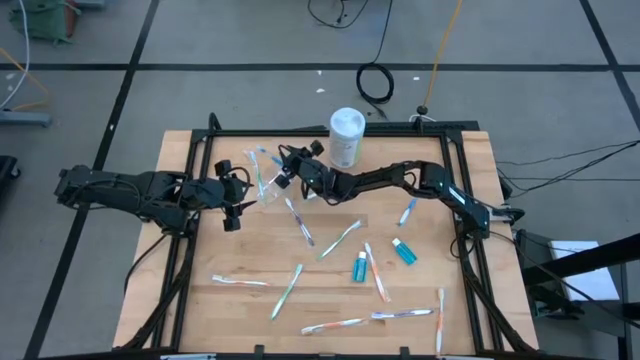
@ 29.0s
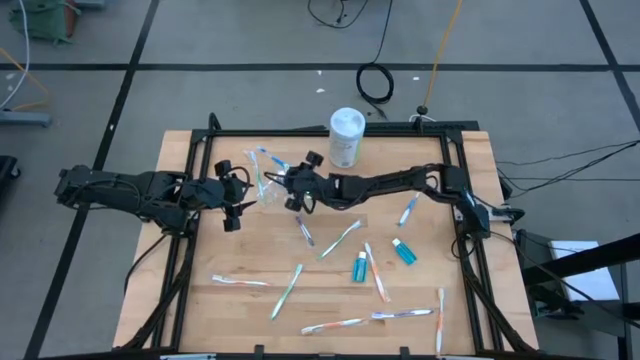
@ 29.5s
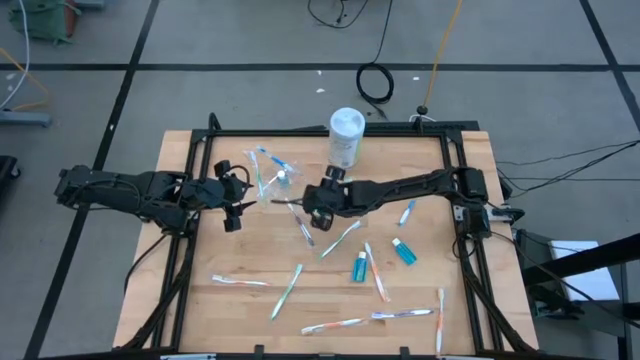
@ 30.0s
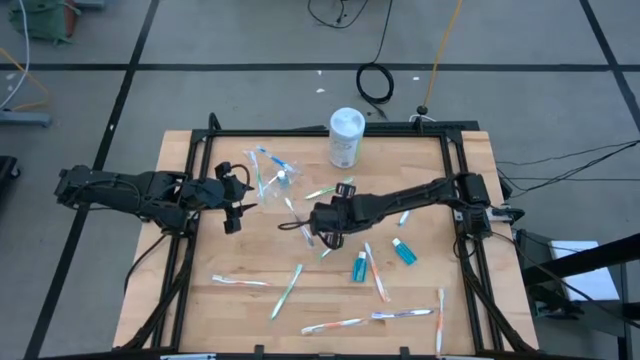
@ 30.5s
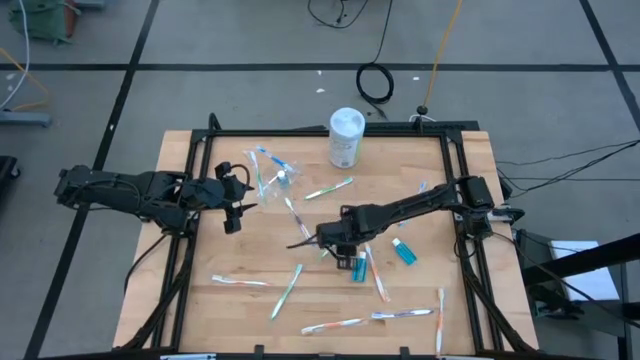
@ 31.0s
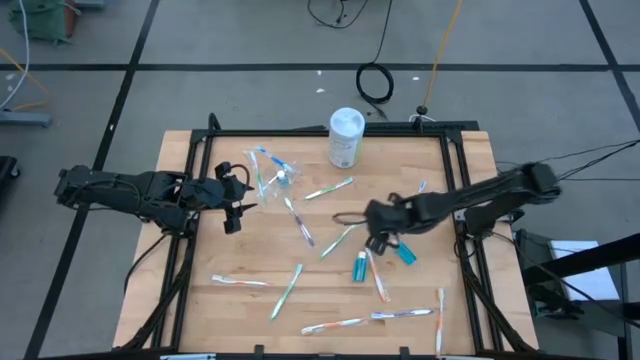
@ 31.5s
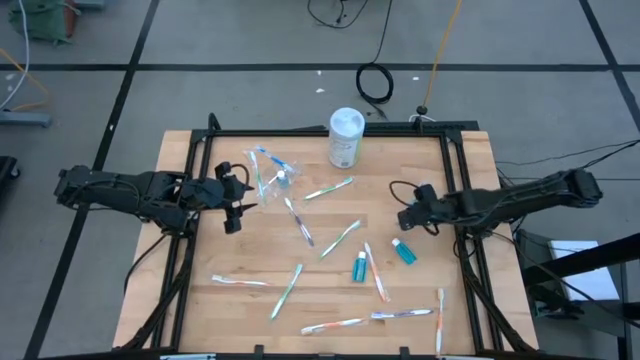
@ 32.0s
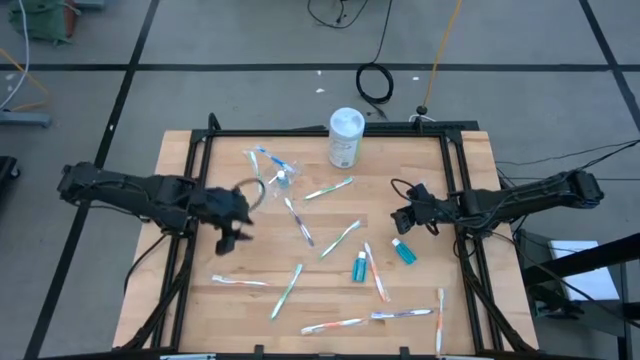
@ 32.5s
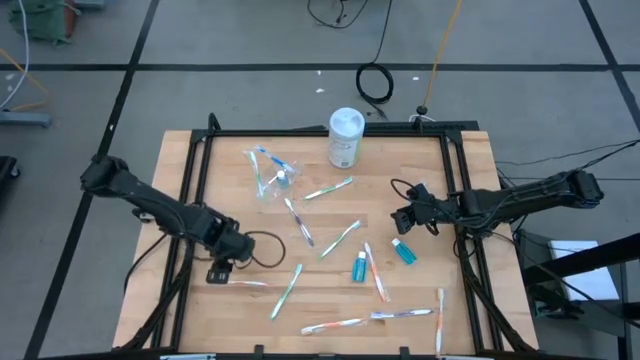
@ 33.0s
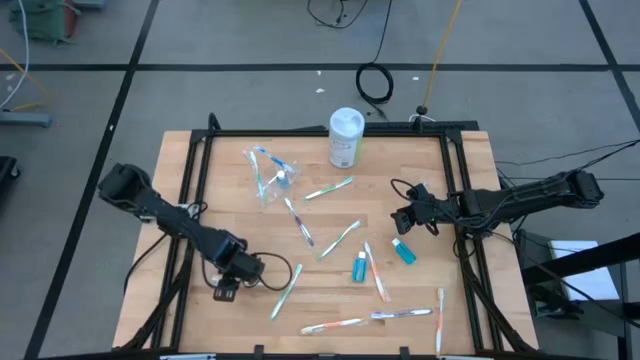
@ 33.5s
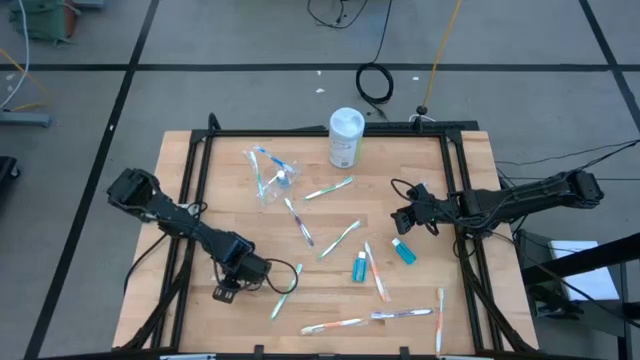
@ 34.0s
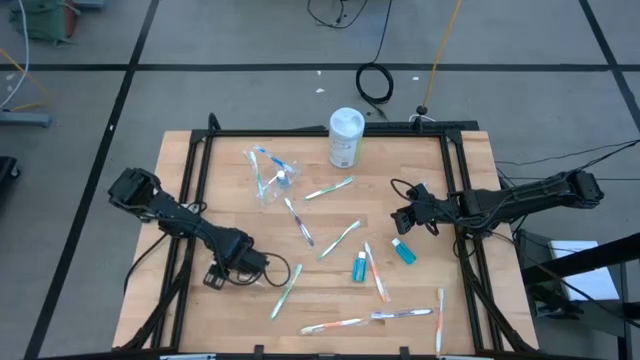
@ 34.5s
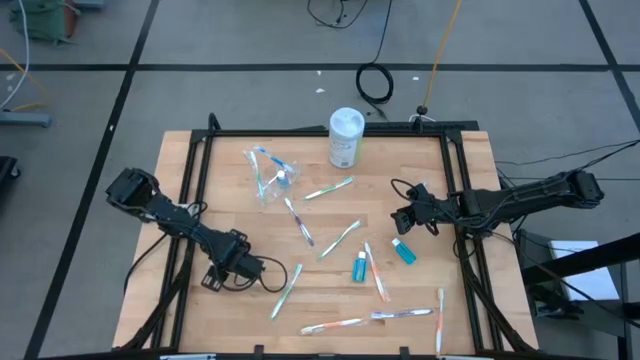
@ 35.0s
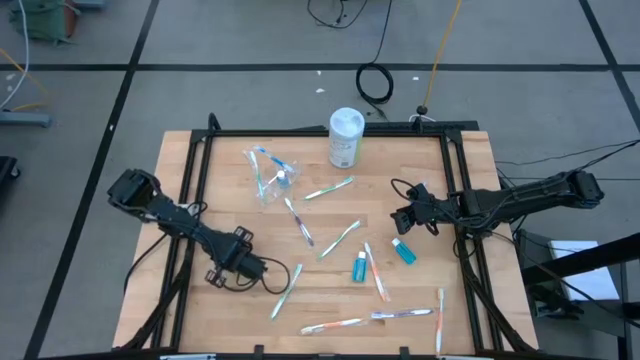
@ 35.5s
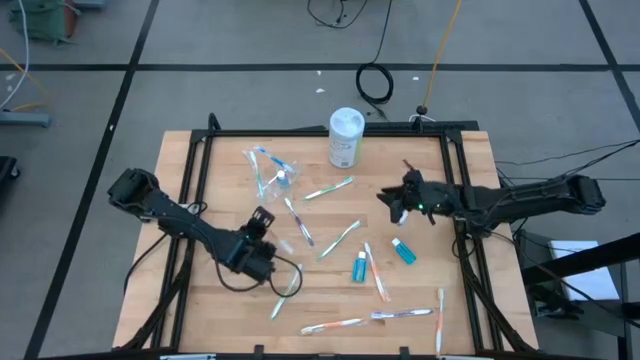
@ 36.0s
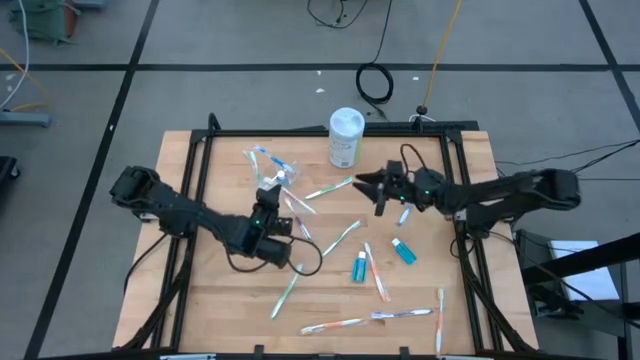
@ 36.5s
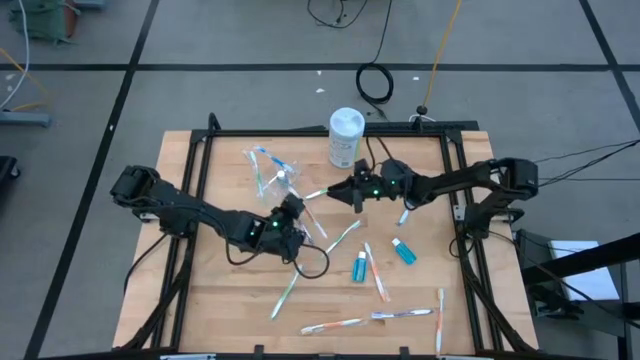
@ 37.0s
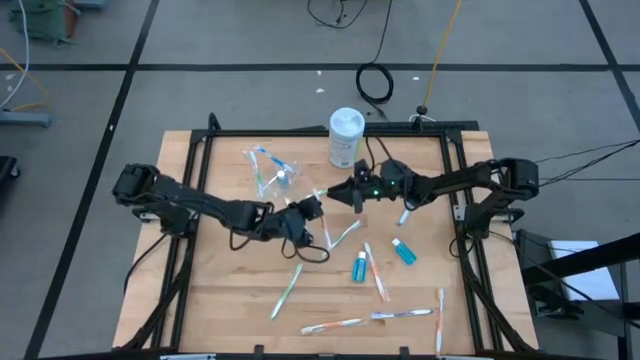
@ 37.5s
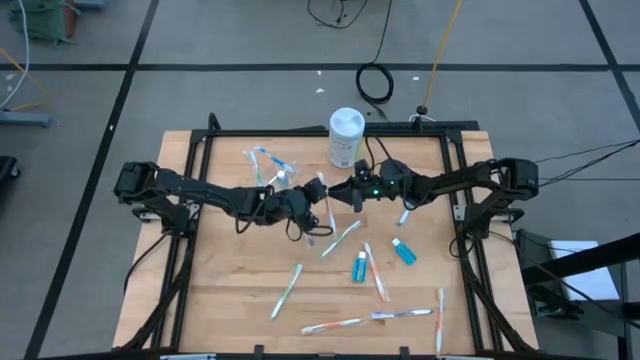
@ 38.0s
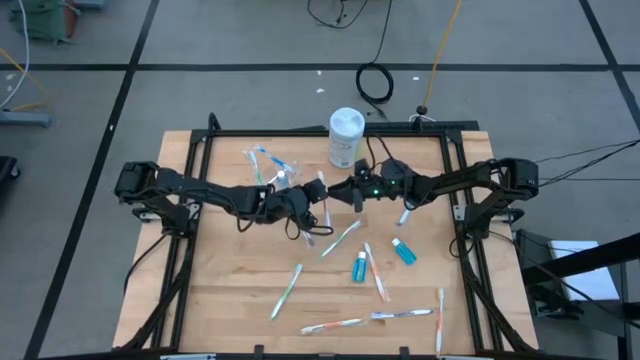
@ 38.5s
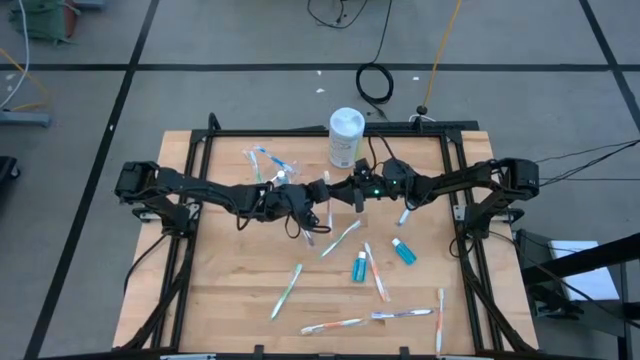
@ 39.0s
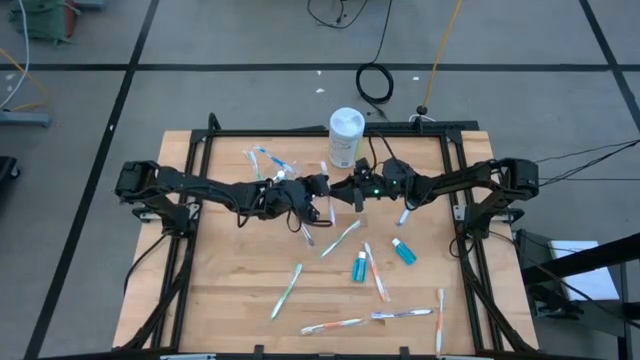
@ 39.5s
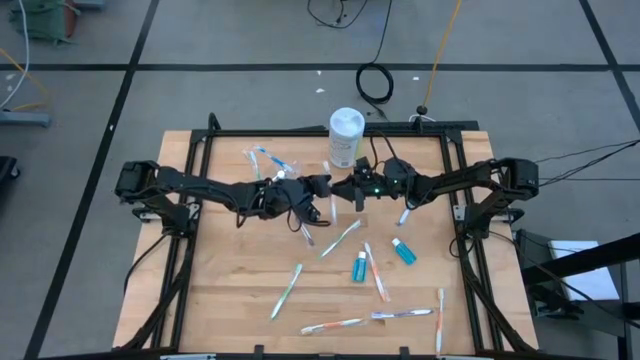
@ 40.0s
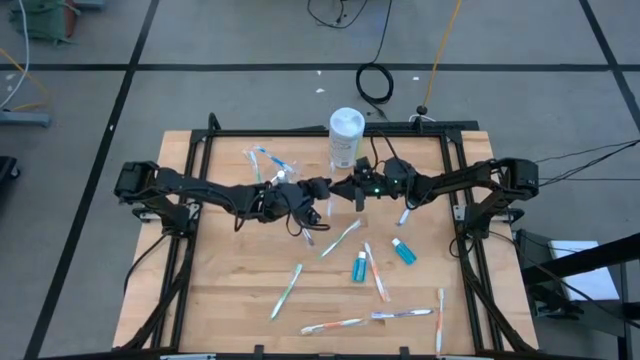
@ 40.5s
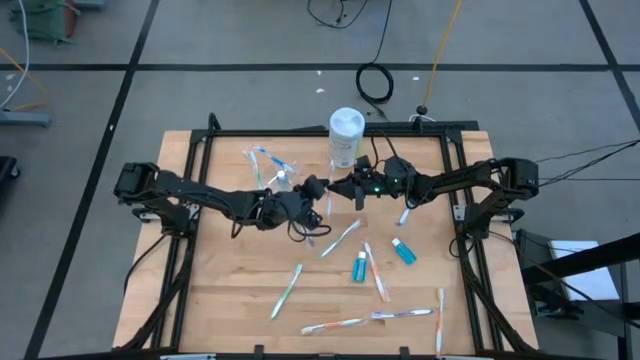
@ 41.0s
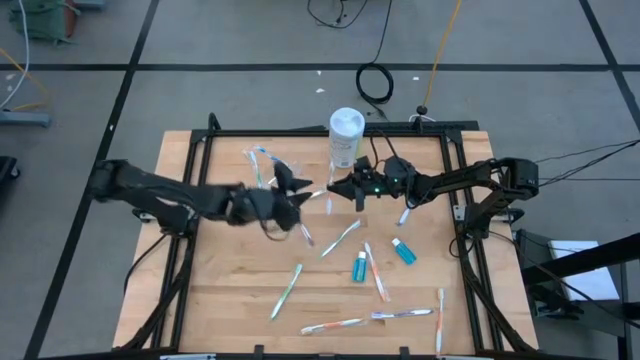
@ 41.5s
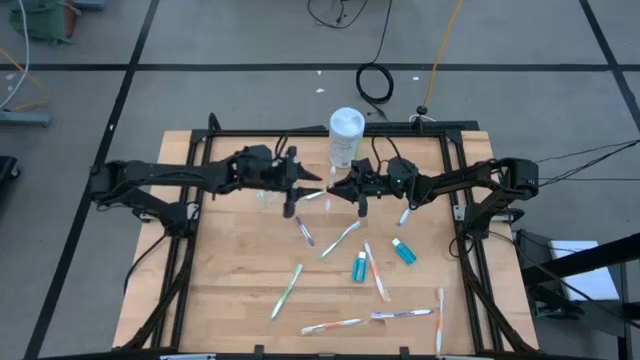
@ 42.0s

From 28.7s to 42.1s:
Task: Pick & Place toothbrushing station
Put the orange toothbrush into the left of the transparent organizer

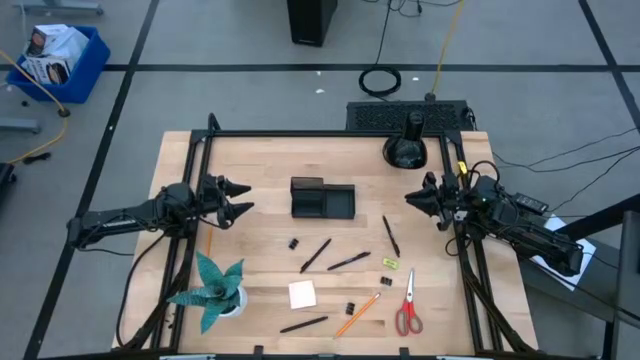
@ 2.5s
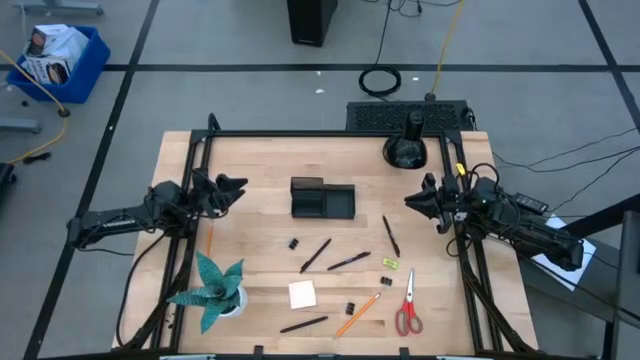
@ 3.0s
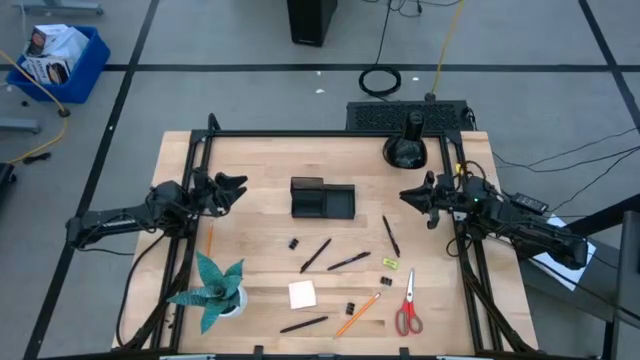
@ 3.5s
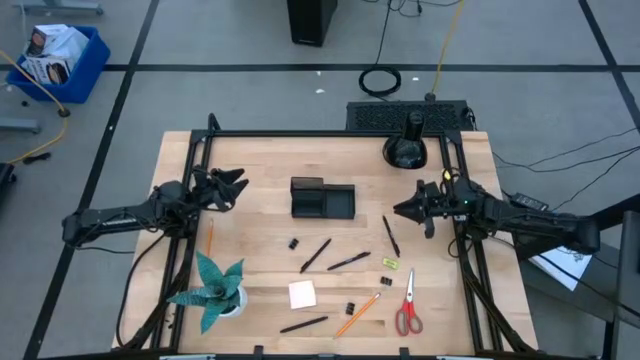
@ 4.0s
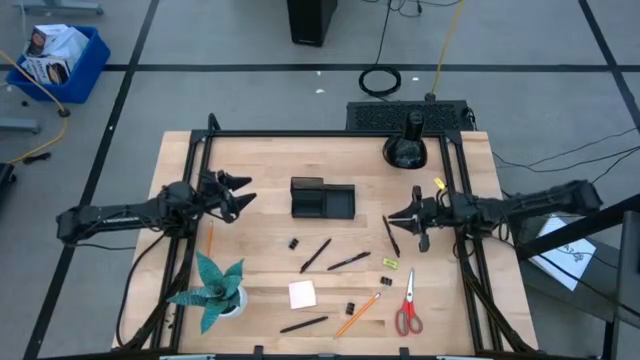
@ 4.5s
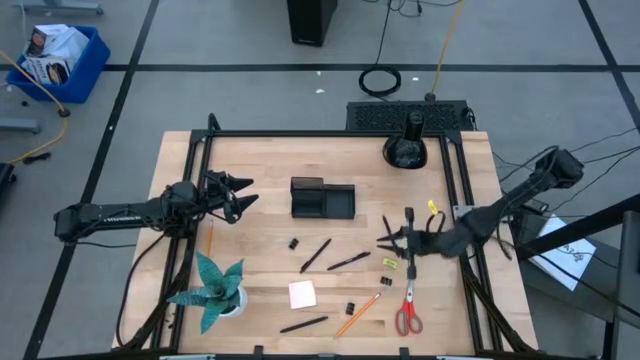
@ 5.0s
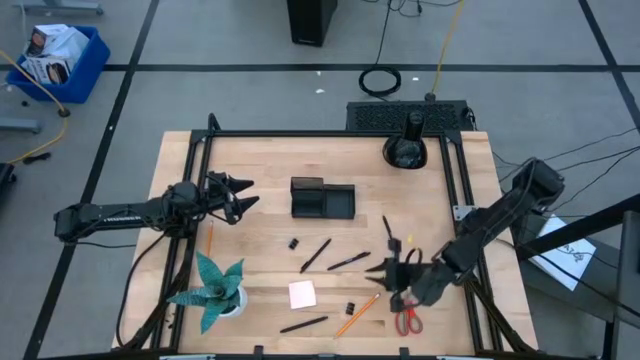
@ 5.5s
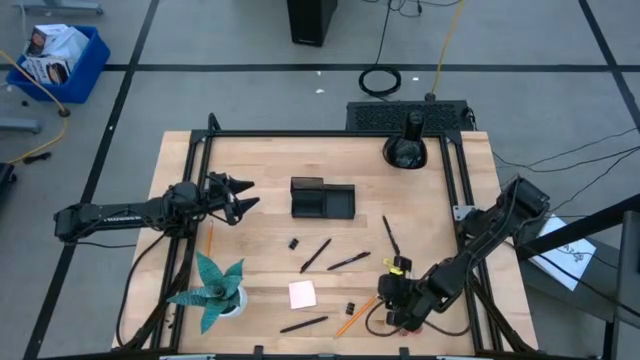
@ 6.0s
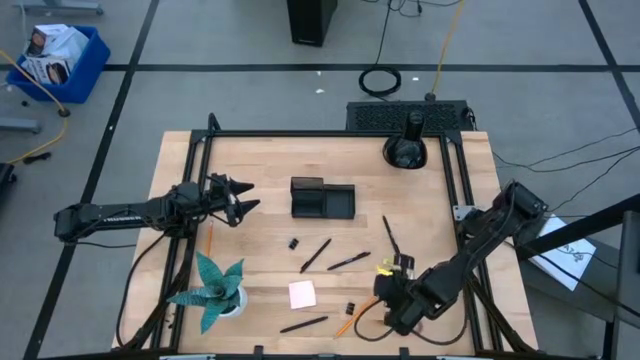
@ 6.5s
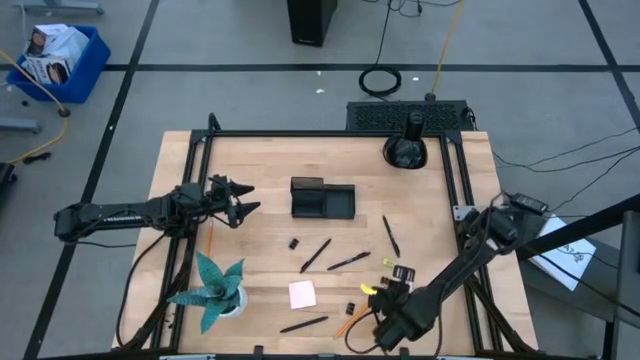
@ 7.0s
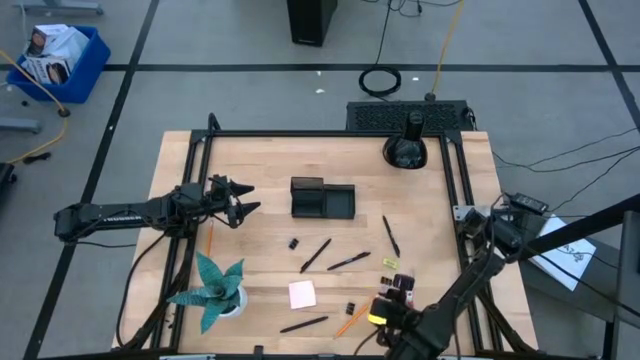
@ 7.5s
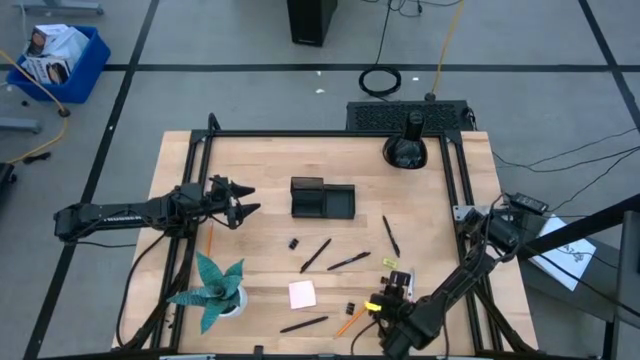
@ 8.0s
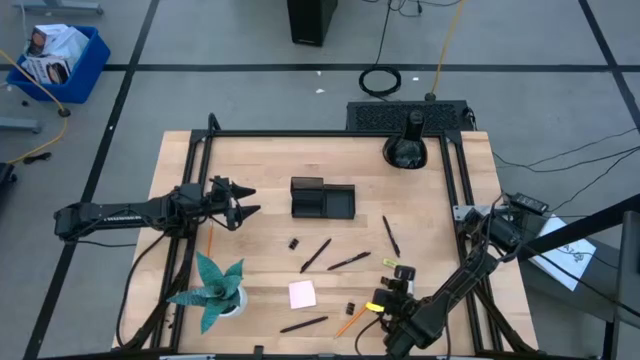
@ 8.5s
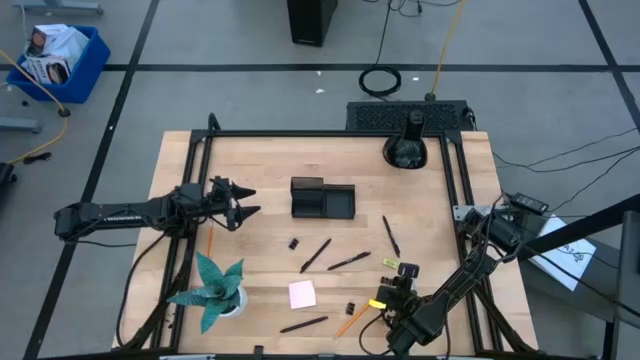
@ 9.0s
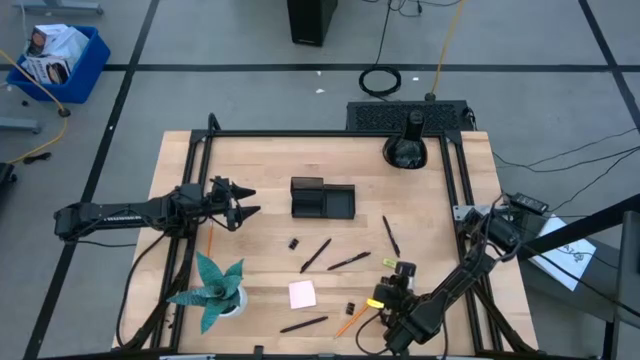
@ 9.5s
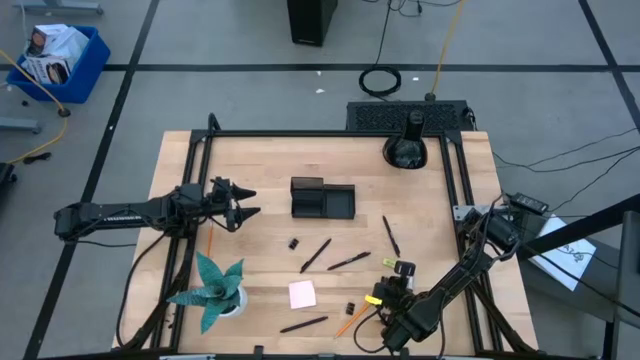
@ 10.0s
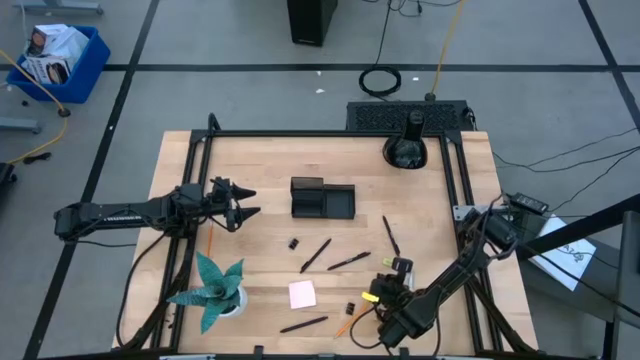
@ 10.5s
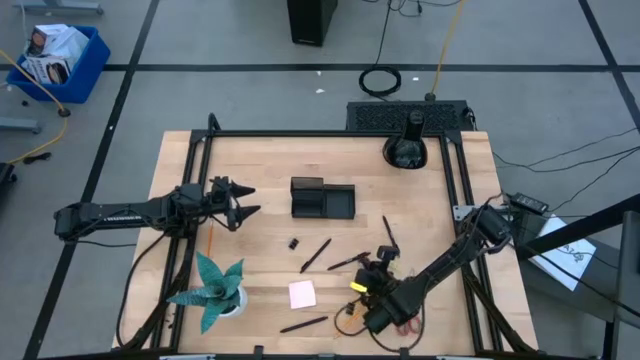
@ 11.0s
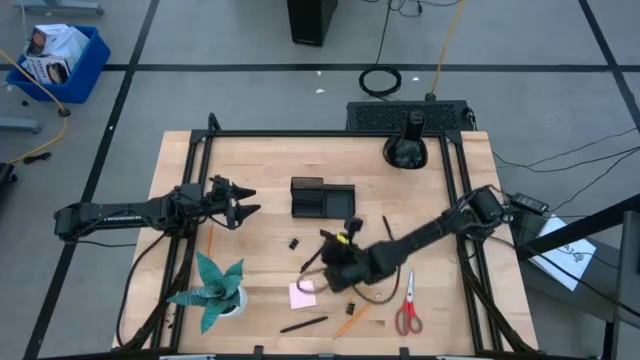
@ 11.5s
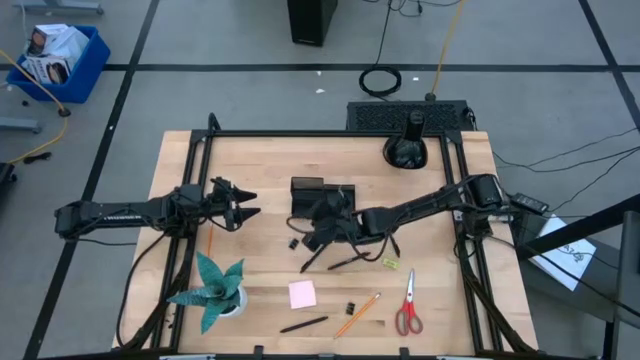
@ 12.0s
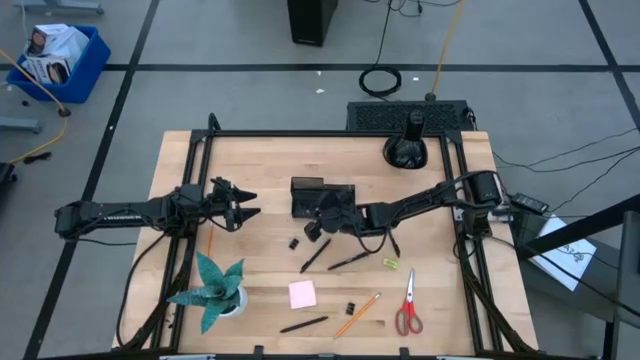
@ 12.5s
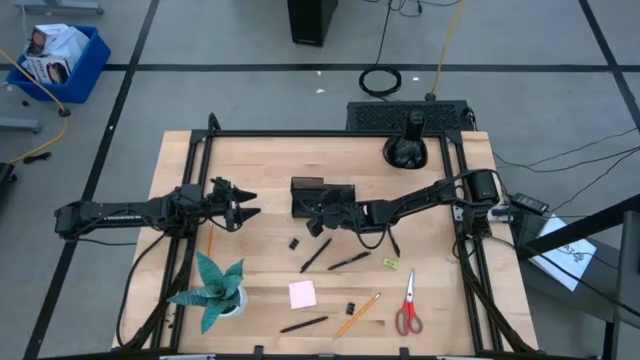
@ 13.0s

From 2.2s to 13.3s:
Task: Pick and place office supplies into organizer
Put the black binder clip into the black desk organizer
